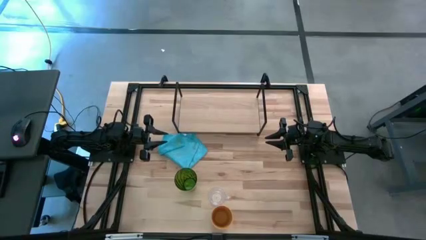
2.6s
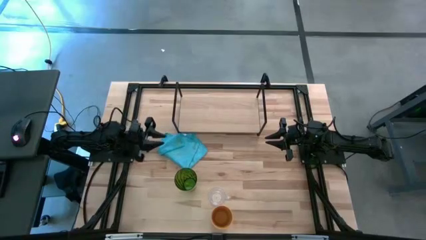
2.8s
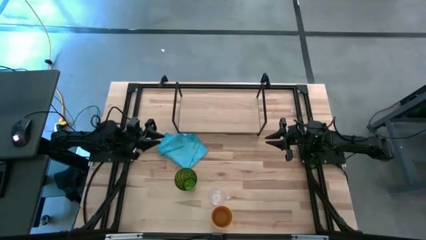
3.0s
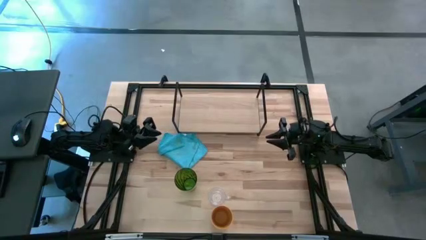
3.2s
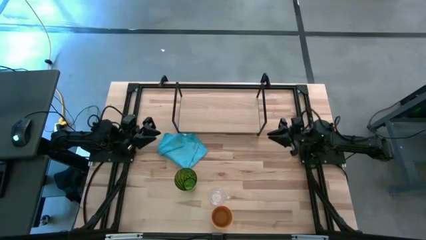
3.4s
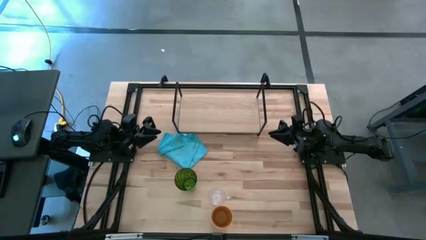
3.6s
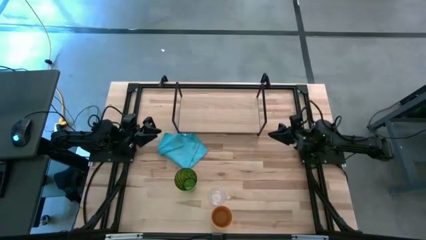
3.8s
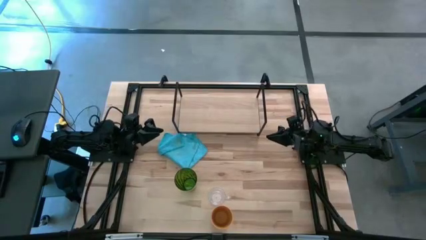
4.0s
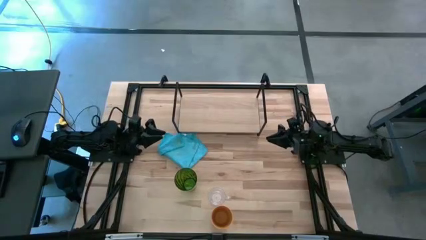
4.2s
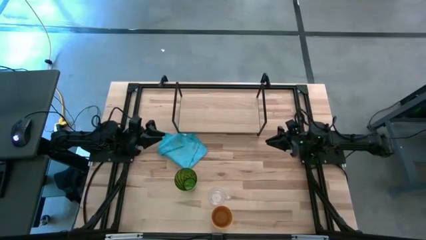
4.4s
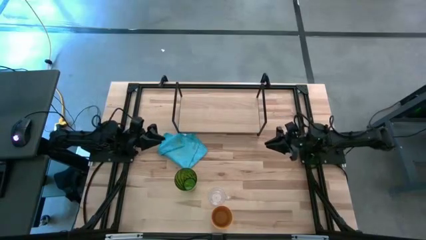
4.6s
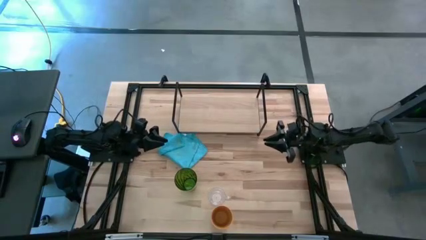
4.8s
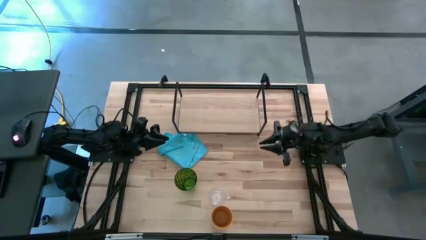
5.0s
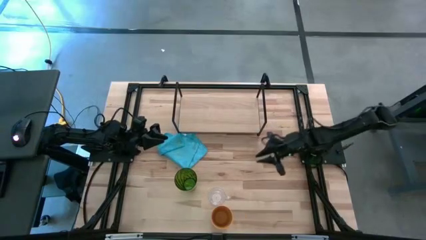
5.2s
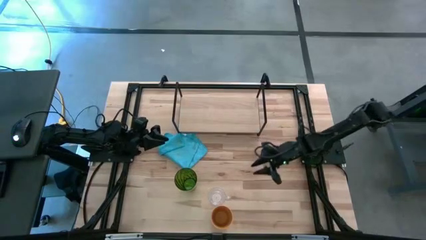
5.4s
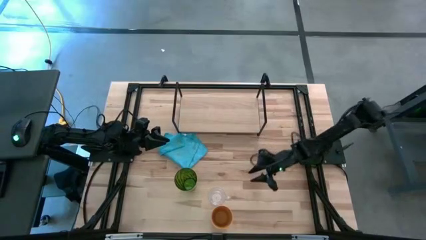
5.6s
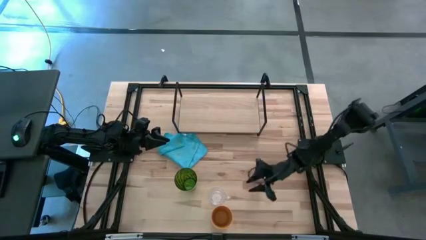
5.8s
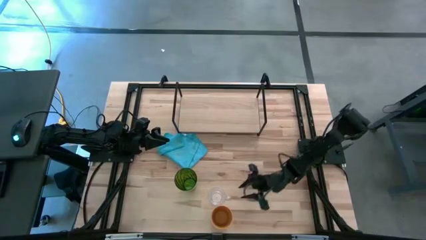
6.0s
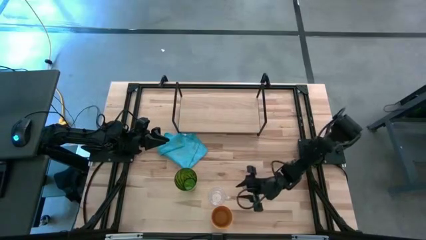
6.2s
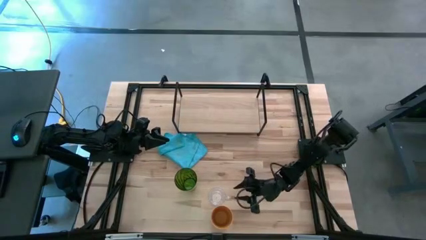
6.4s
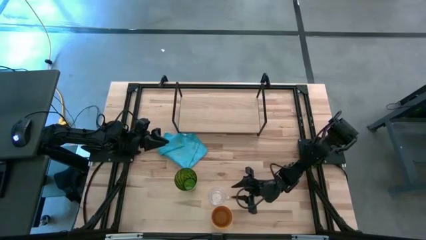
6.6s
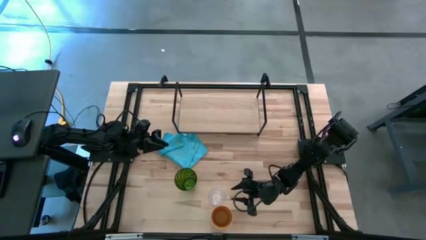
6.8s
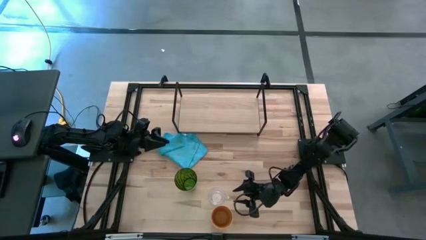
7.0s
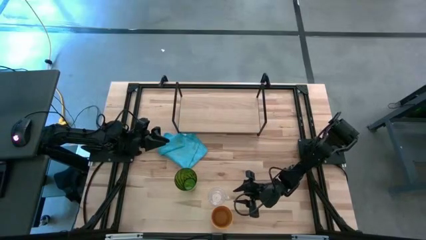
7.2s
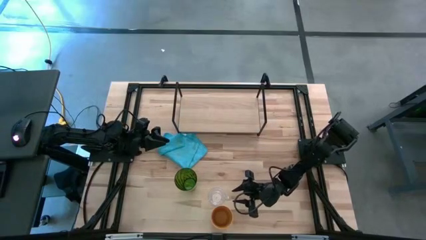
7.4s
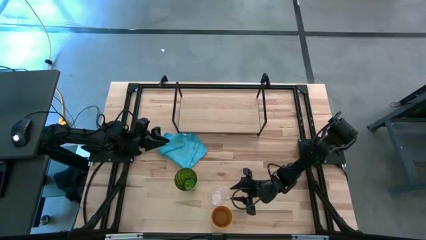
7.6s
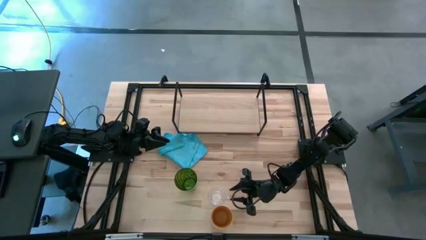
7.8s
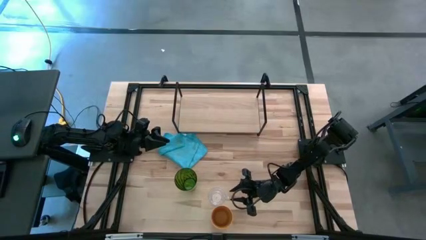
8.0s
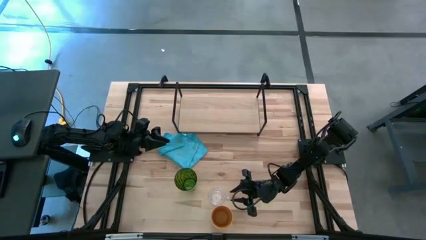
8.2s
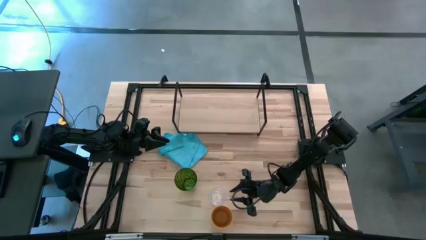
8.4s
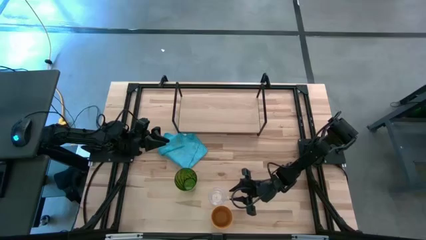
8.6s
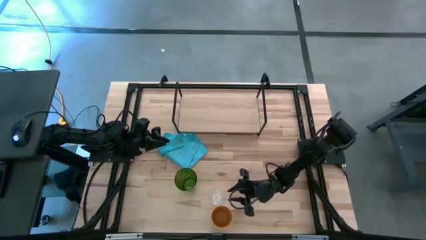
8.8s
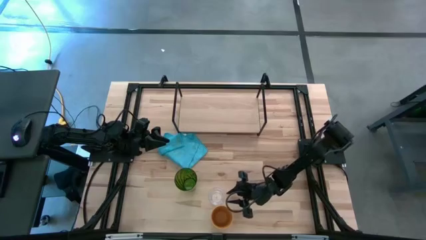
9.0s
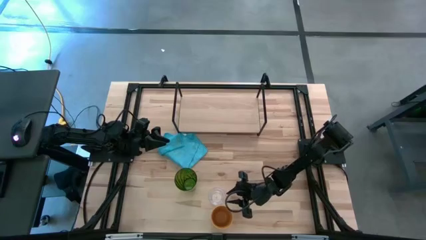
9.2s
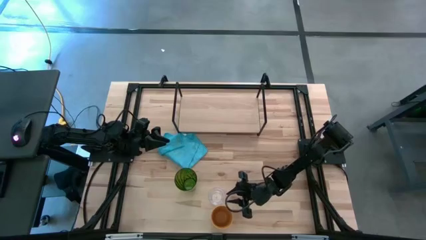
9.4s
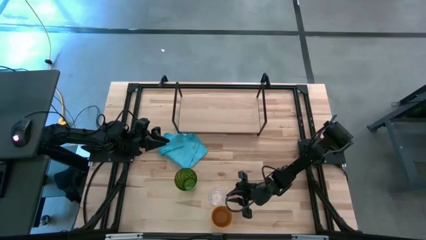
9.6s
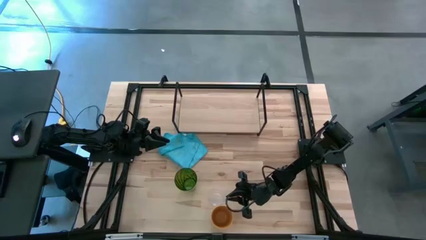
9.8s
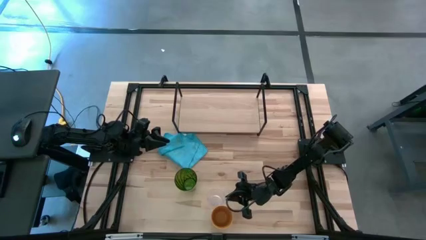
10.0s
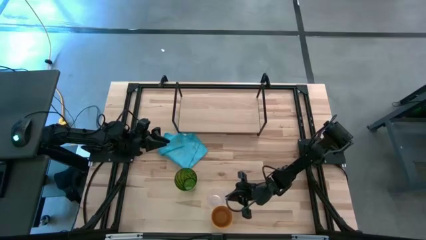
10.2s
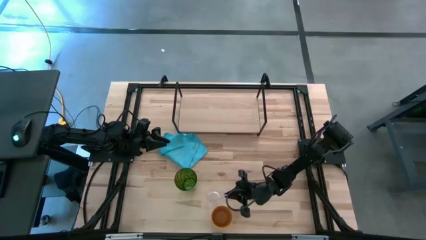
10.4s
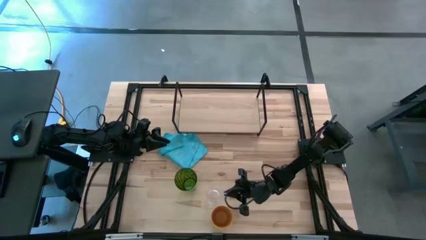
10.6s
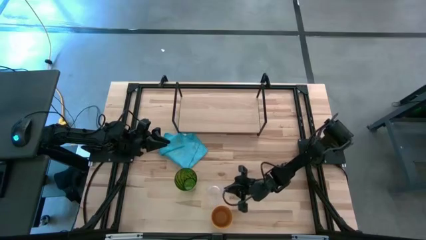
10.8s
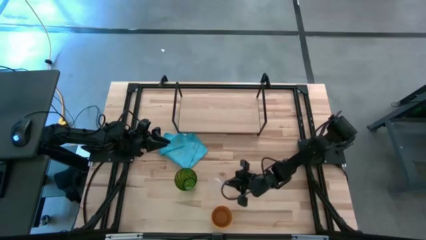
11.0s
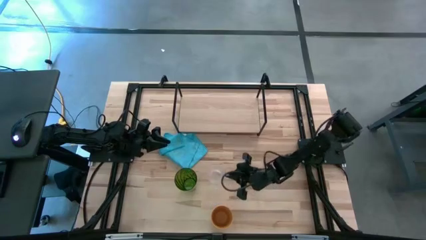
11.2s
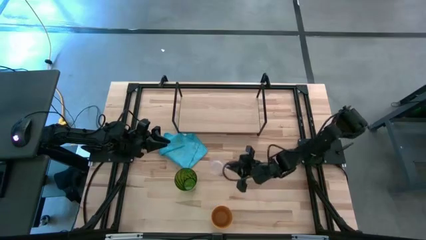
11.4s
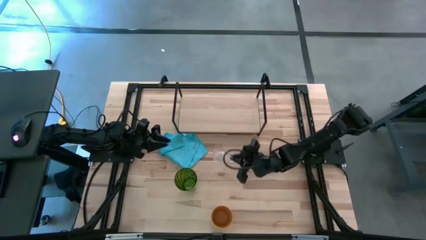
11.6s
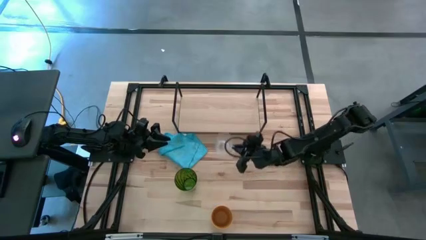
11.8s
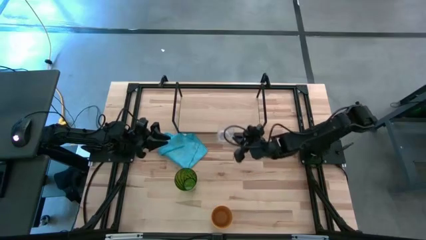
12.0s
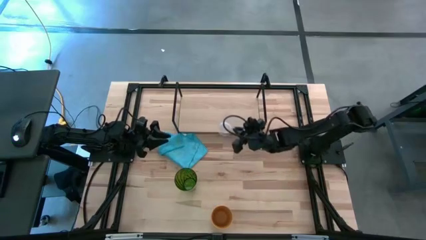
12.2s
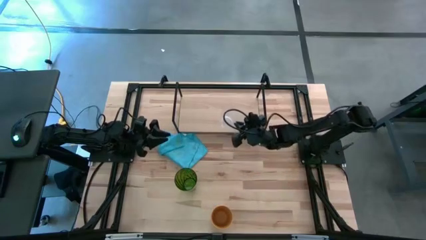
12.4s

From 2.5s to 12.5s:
Task: Stack small to large cups/mugs on shelf
Put the transparent mug on the shelf

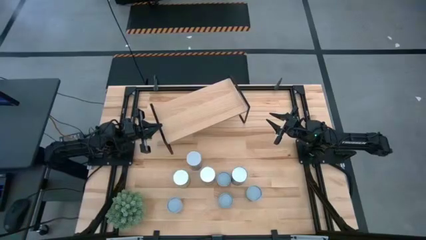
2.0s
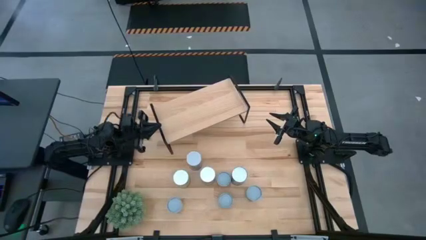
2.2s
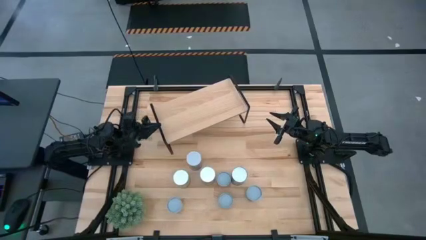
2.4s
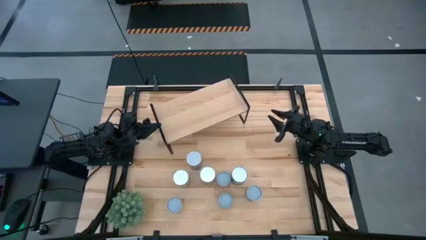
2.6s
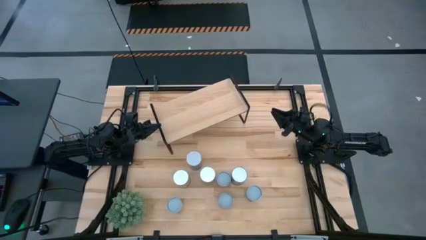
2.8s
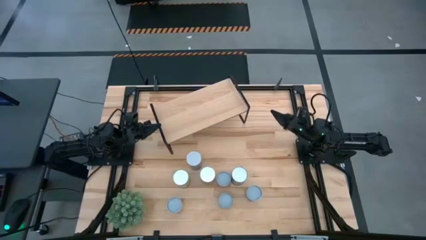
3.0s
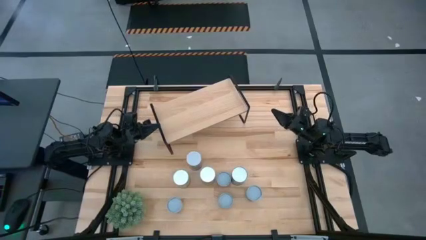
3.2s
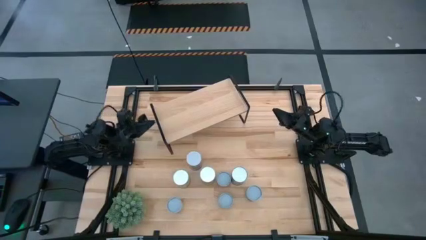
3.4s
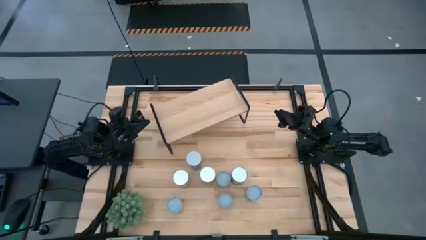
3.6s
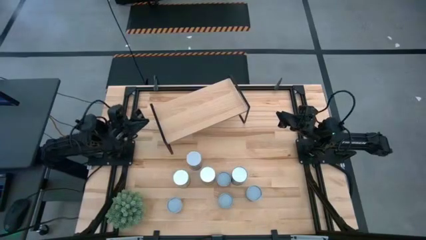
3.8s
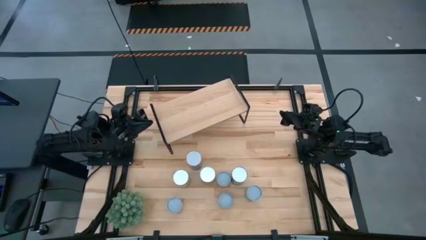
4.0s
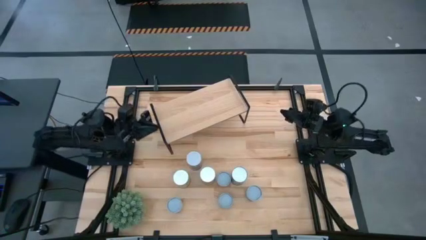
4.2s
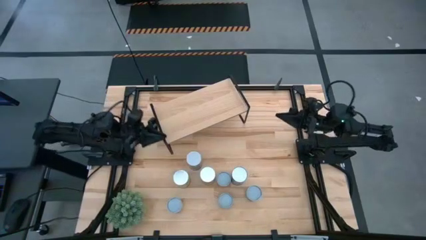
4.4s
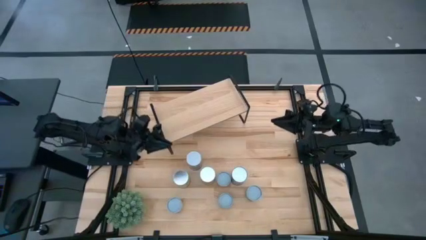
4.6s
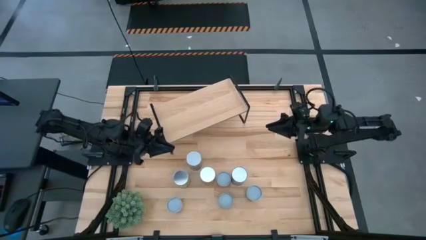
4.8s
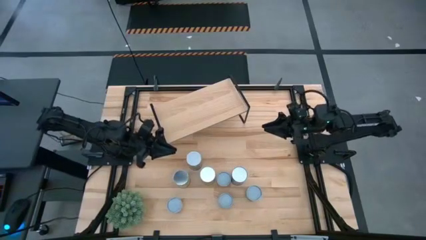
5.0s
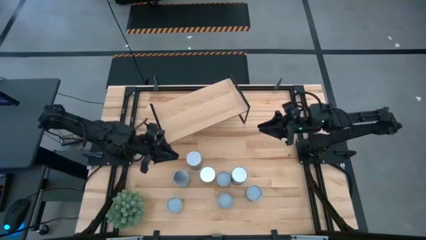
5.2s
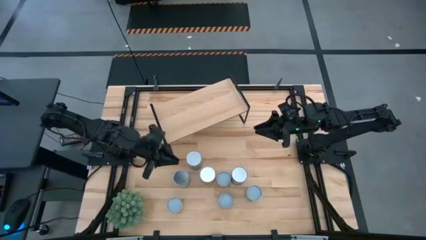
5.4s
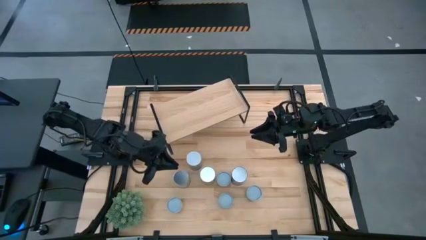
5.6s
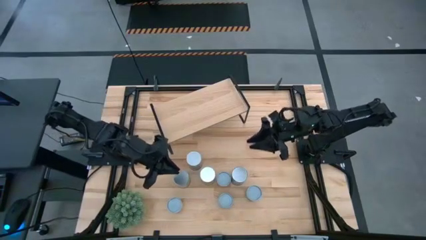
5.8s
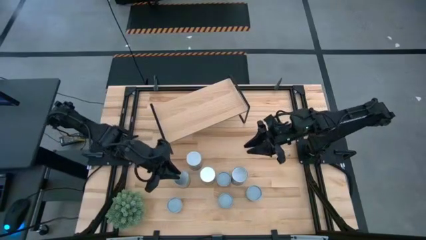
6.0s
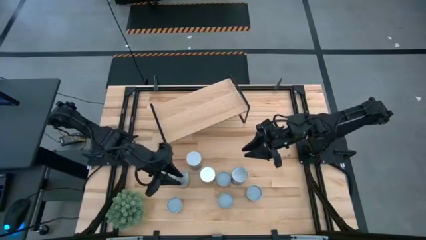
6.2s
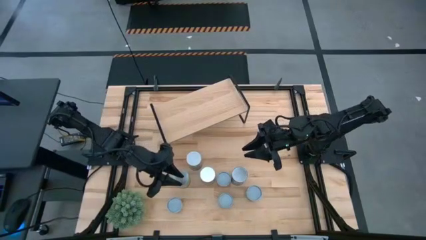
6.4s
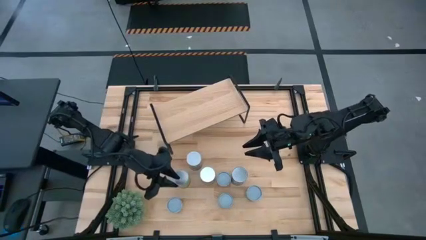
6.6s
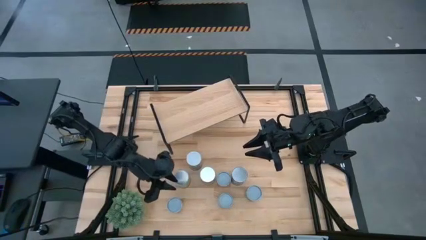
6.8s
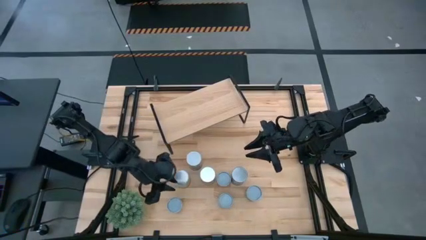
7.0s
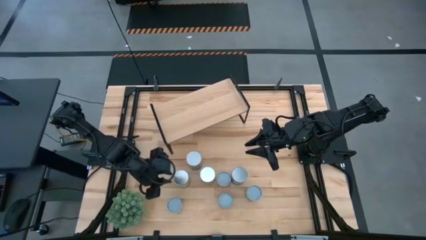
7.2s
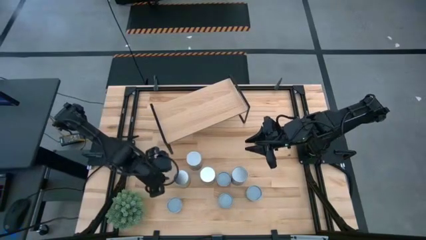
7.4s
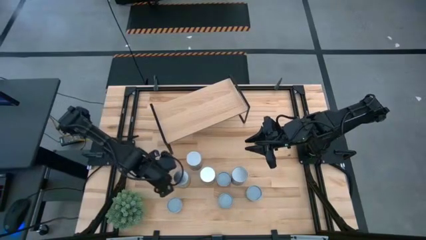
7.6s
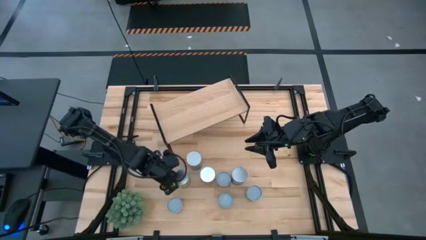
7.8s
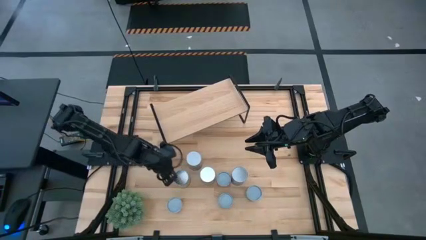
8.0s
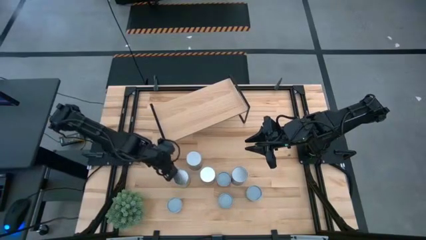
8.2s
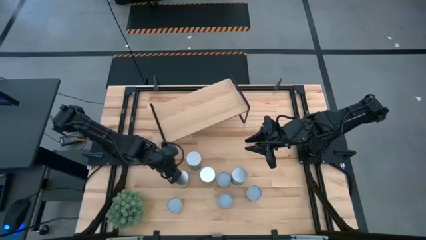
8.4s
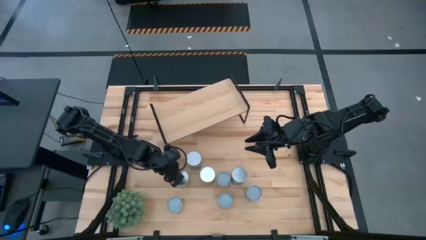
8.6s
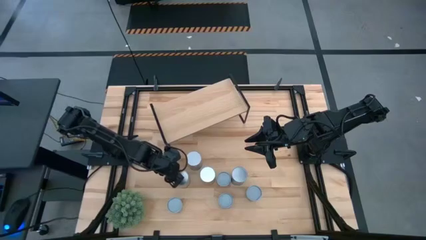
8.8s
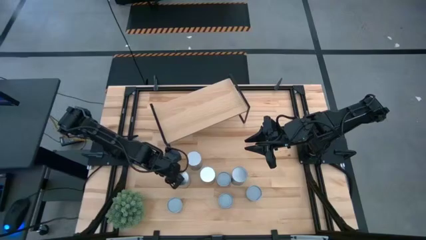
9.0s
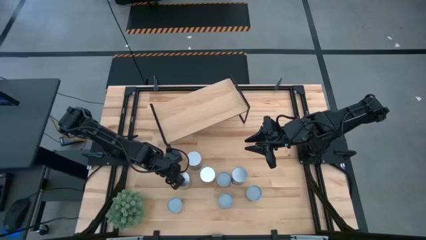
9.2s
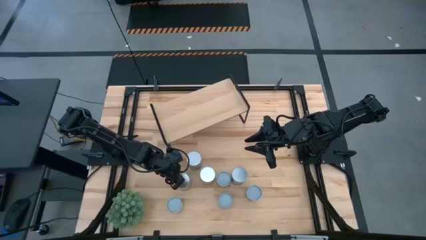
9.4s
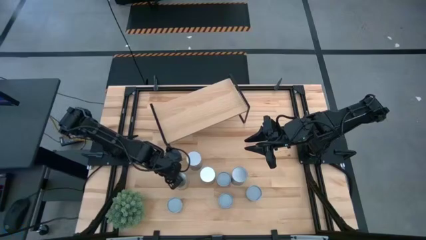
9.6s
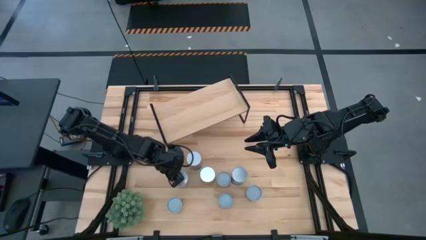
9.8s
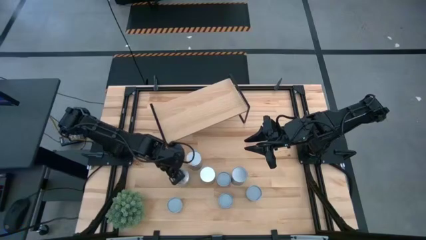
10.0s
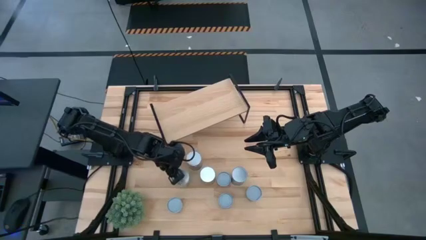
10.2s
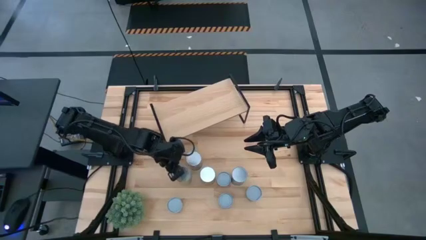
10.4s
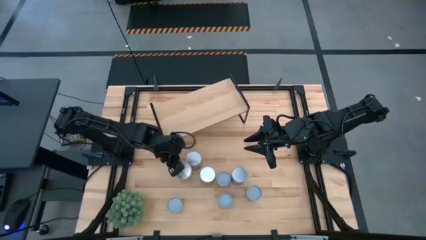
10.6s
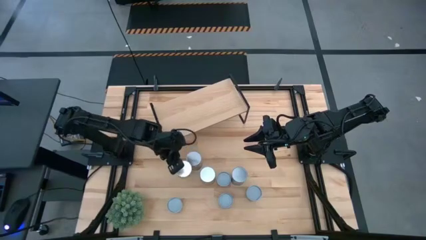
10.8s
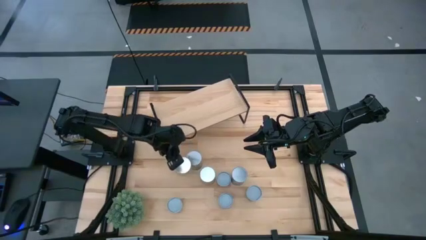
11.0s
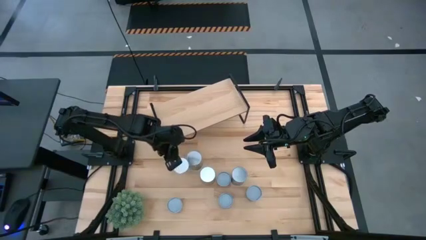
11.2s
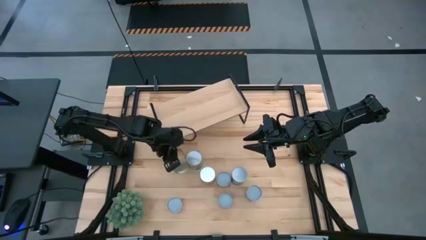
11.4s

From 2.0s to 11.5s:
Task: Pick and place cans onto a shelf
Put the canned oranges on the shelf
